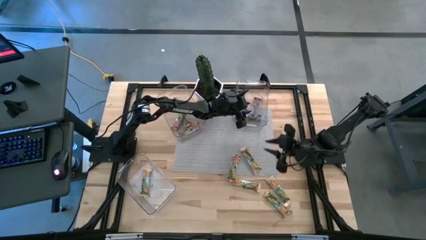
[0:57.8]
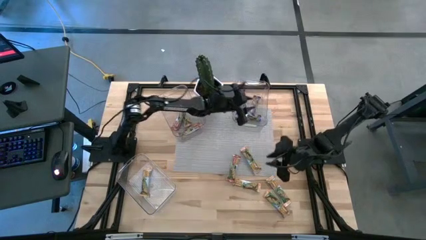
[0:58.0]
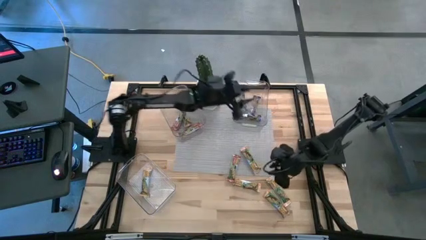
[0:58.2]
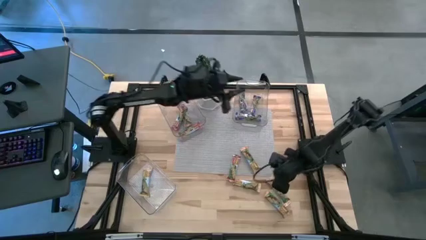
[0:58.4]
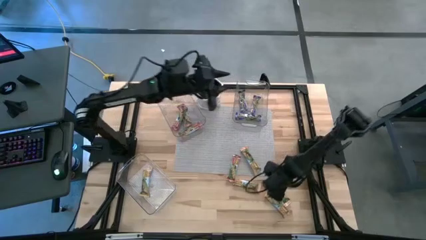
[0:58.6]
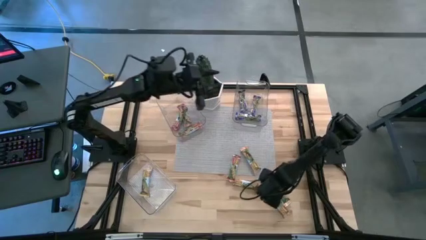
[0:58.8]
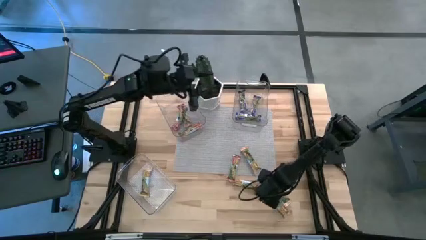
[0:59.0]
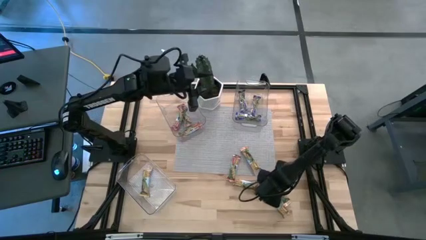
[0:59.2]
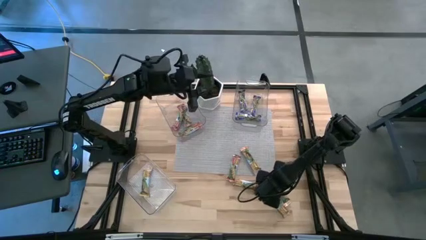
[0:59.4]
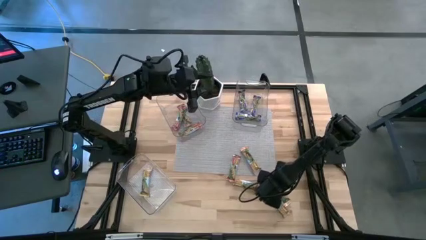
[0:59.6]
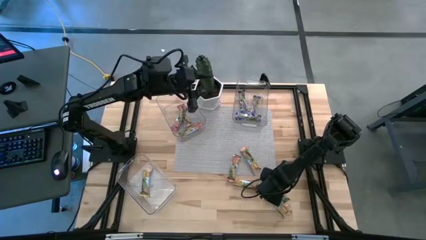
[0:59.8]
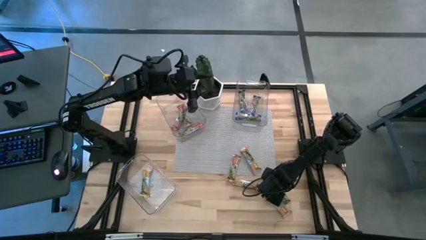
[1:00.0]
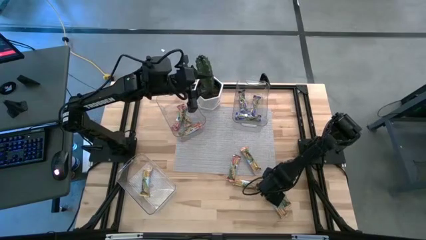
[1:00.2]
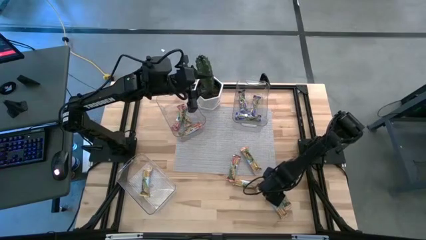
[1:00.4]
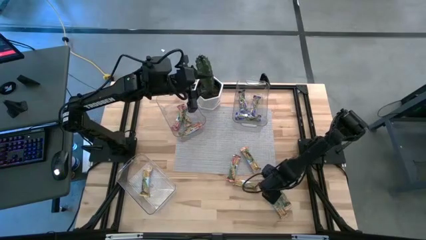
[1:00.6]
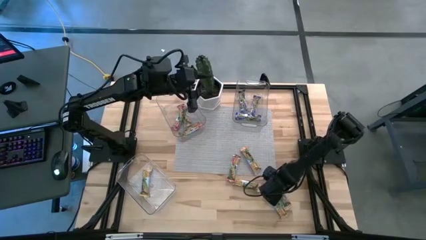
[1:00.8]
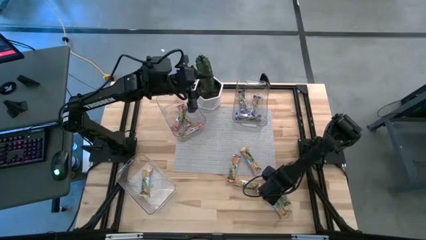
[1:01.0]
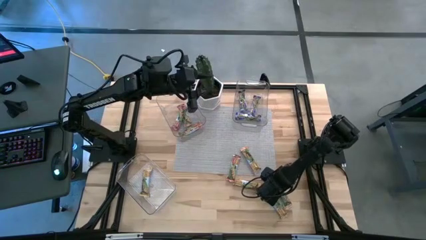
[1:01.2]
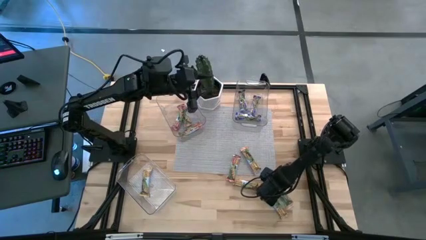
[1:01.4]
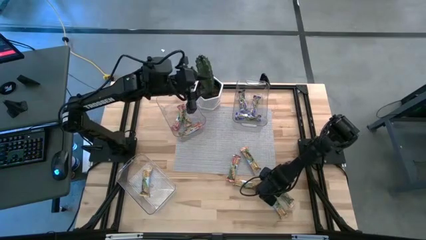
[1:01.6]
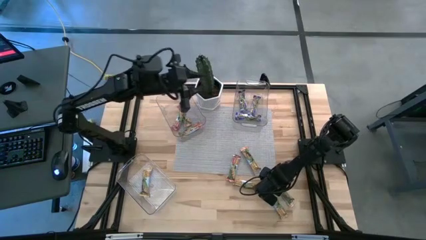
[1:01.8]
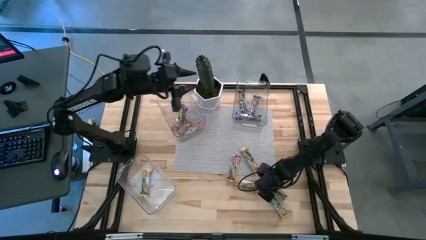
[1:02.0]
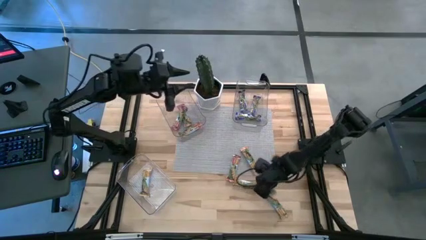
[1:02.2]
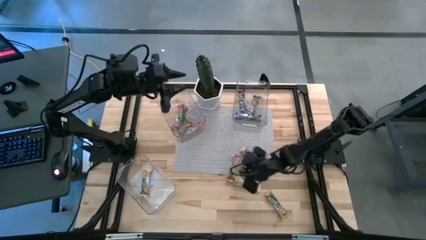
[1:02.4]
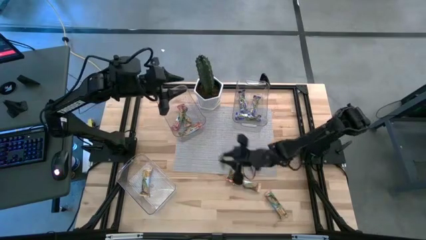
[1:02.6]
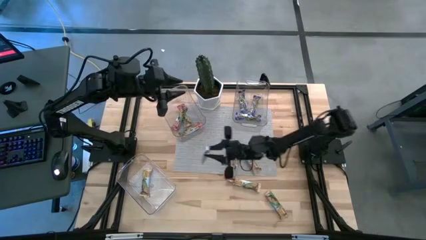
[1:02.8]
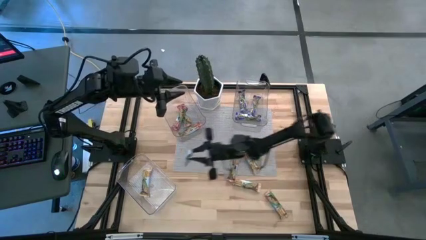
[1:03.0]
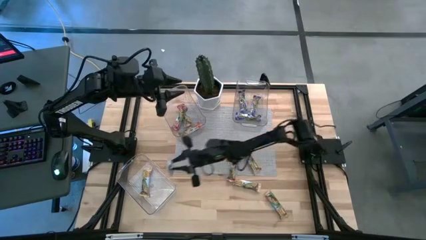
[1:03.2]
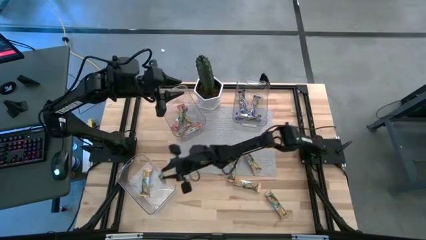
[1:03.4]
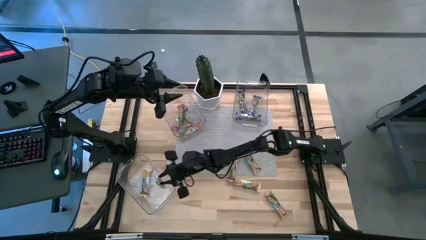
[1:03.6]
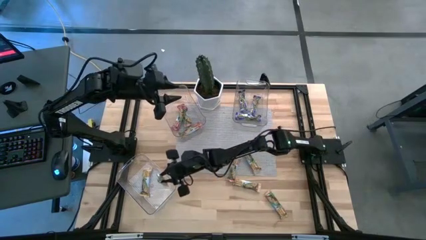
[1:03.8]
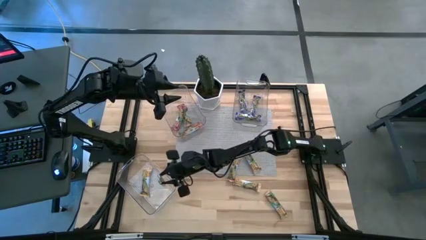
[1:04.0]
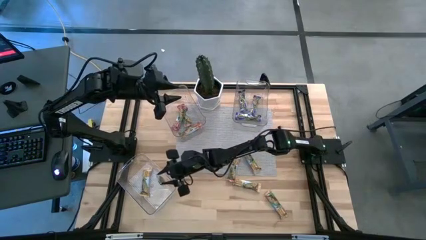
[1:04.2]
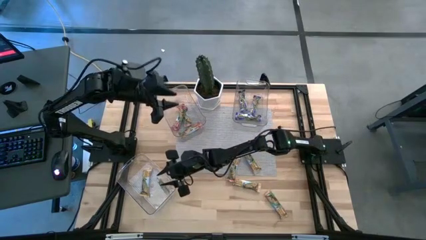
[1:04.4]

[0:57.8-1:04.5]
Task: Pick and place Granola Bars by type
Put the yellow granola bar into the bottom transparent bin

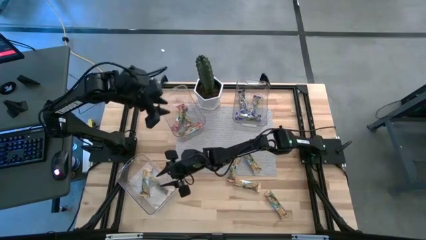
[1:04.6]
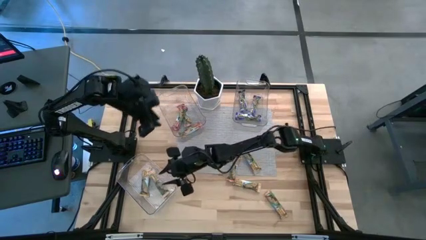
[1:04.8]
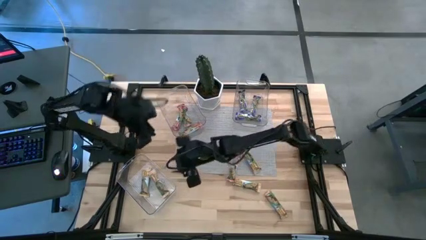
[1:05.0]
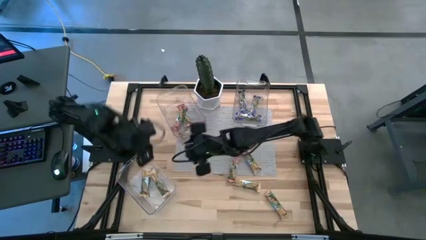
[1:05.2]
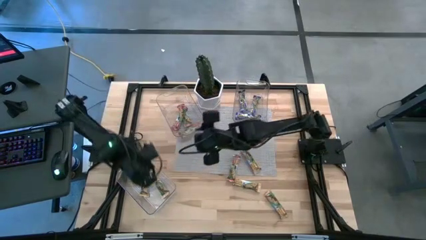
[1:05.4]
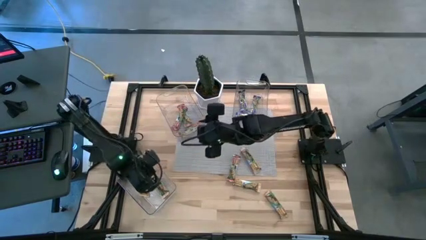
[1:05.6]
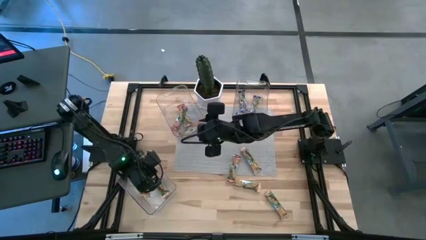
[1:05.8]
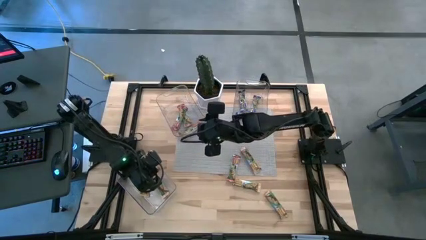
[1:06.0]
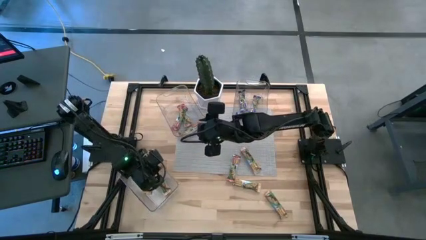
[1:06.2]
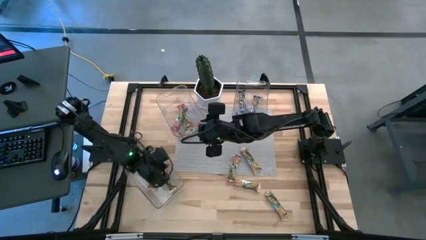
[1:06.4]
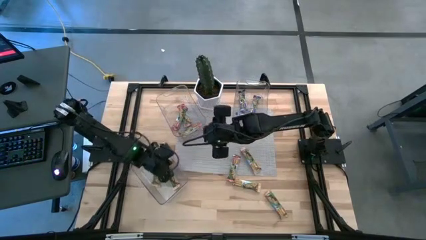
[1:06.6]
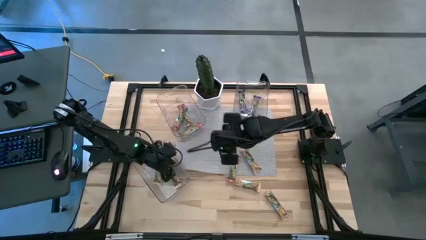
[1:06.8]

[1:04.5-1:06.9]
Adjust the bottom transparent bin

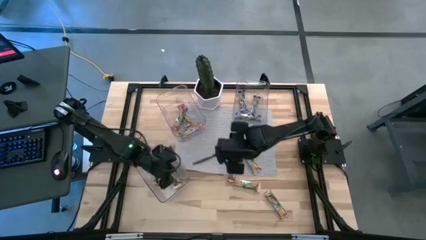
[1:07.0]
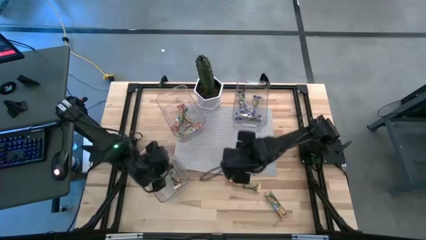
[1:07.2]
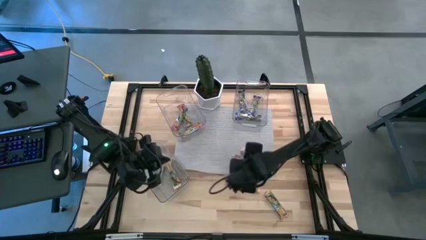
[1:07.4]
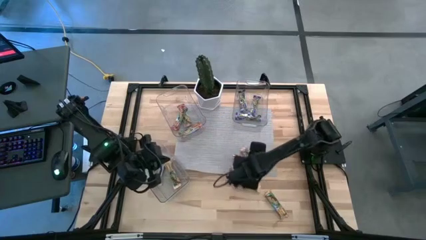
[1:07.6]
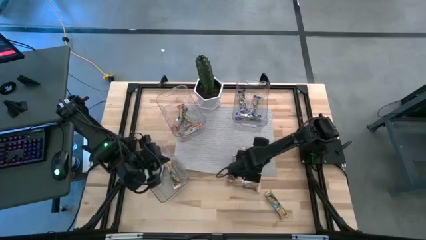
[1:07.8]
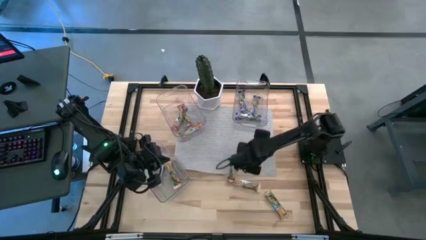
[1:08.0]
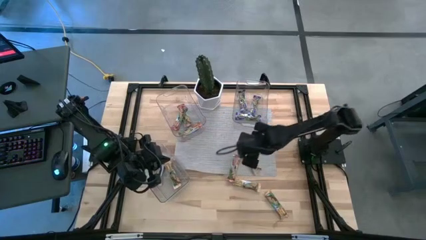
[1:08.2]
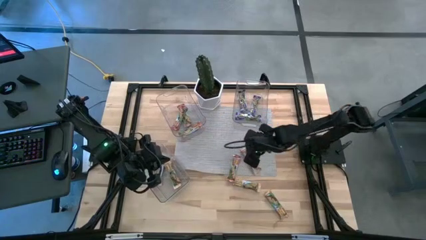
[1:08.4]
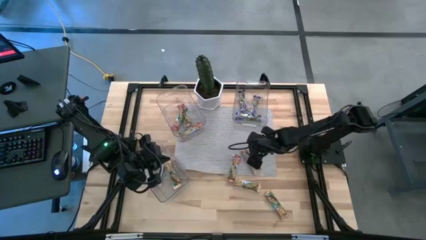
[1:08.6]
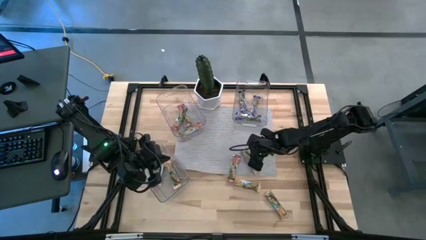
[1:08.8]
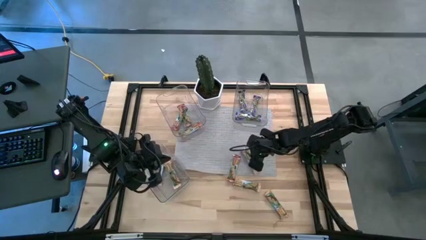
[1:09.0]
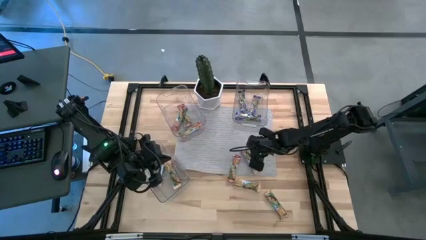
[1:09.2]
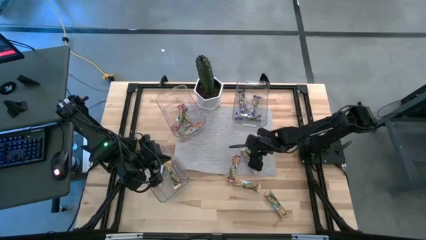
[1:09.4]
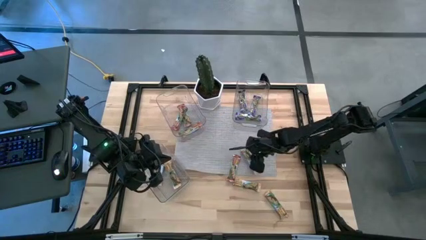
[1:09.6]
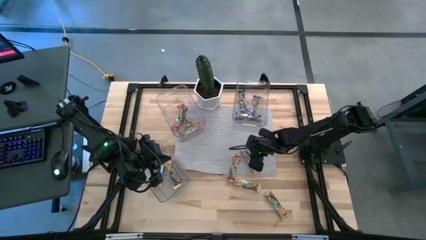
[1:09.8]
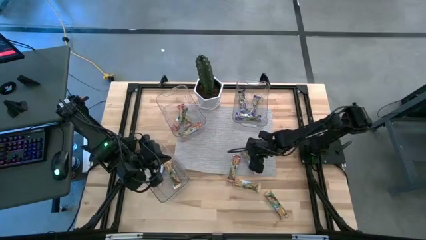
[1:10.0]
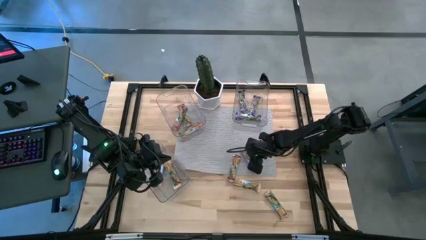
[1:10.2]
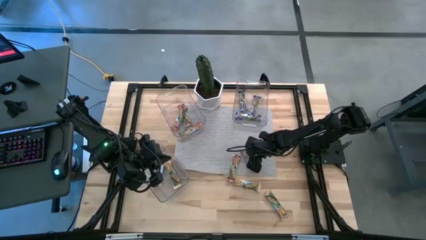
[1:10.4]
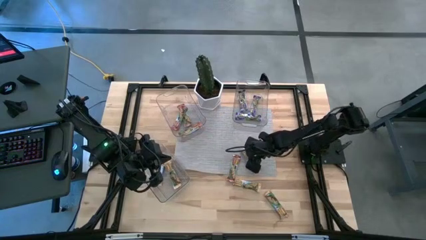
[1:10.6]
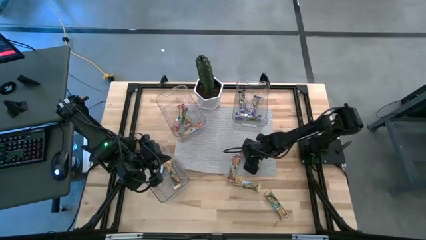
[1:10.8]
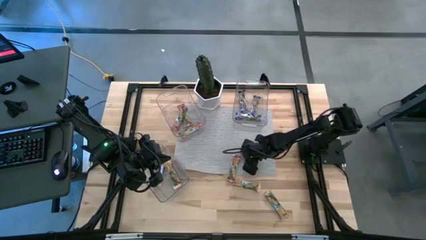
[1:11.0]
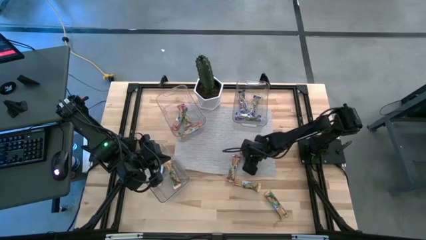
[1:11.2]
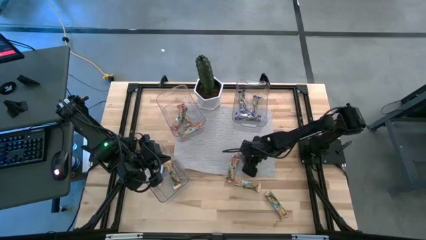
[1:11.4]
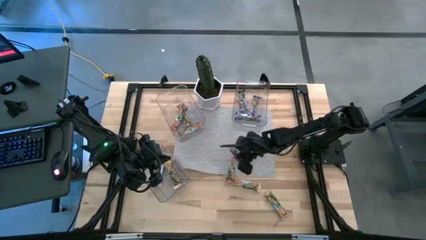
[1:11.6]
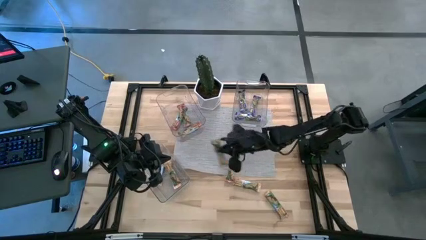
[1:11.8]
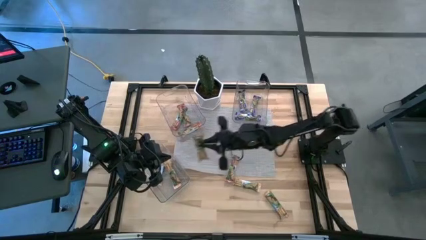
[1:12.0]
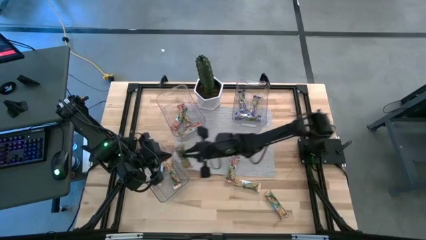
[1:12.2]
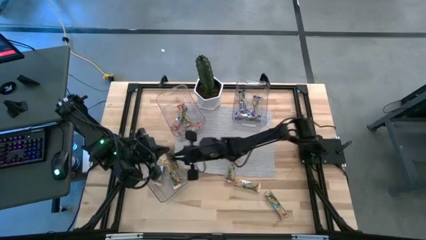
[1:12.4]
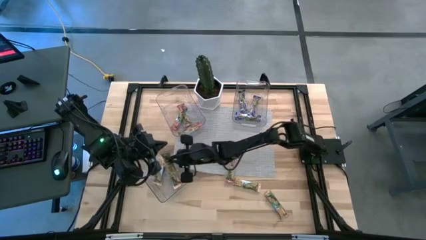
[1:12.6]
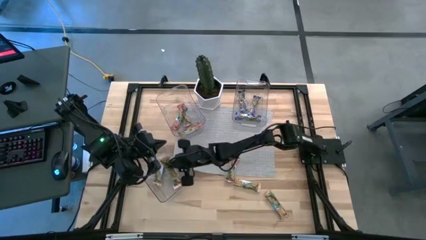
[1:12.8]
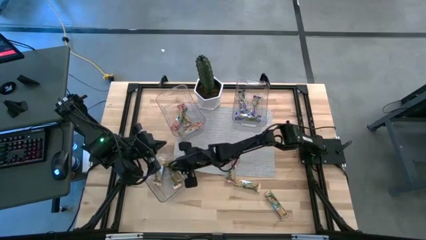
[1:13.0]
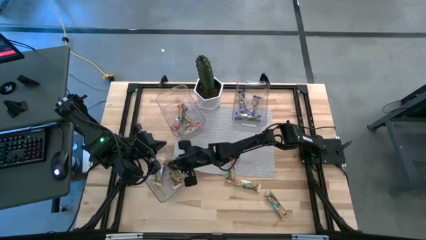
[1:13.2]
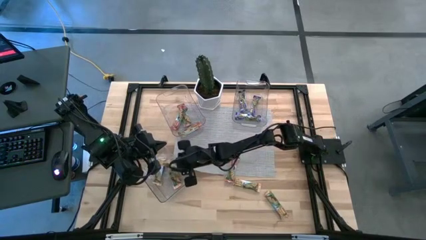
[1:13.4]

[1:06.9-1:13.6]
Put the yellow granola bar into the bottom transparent bin
